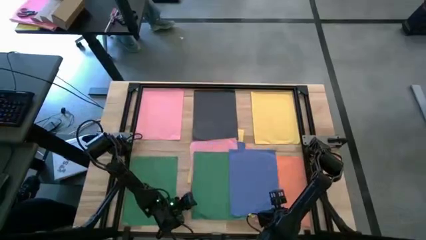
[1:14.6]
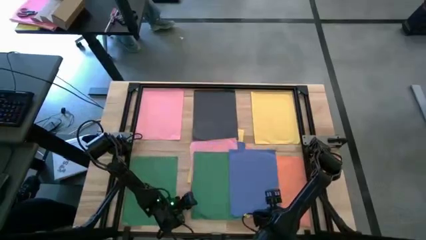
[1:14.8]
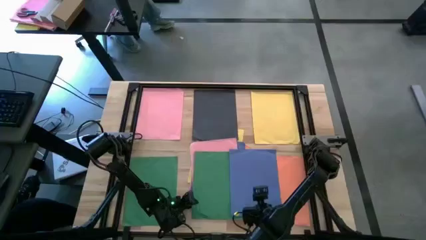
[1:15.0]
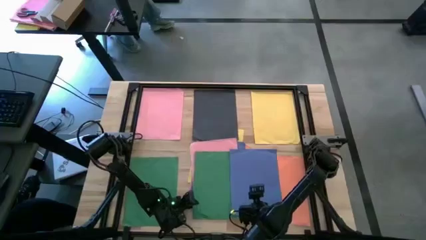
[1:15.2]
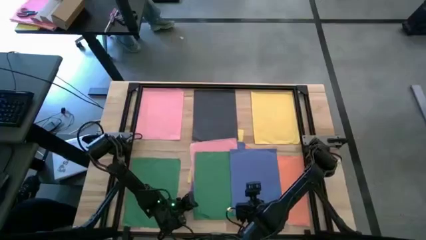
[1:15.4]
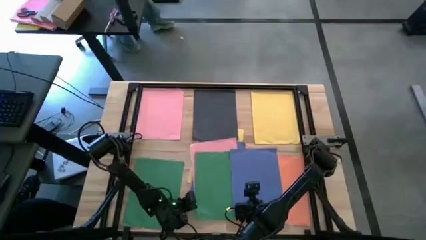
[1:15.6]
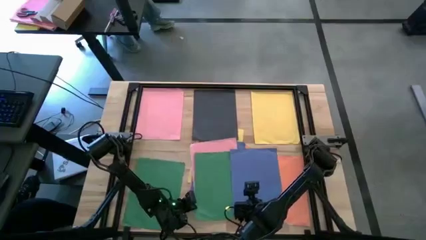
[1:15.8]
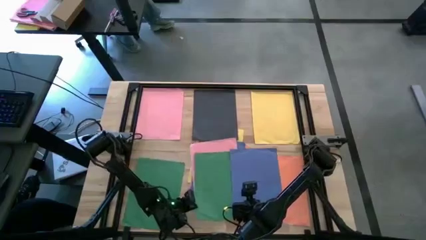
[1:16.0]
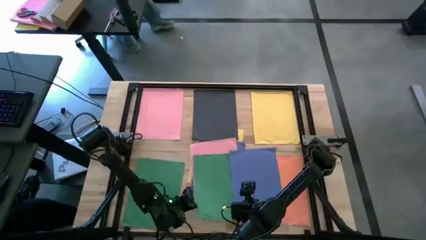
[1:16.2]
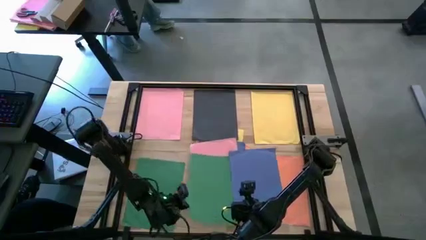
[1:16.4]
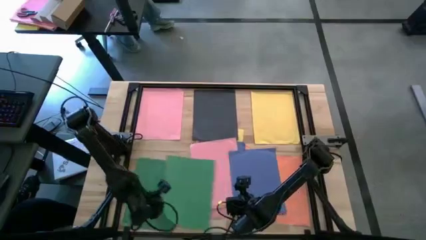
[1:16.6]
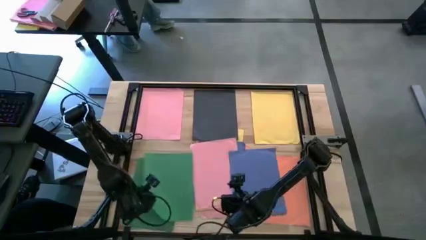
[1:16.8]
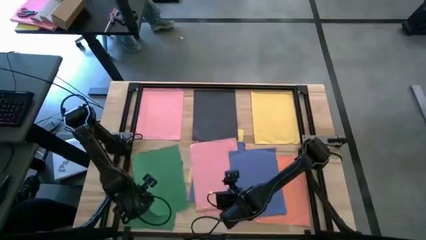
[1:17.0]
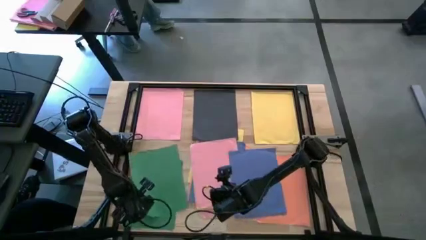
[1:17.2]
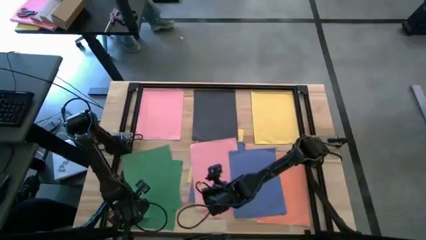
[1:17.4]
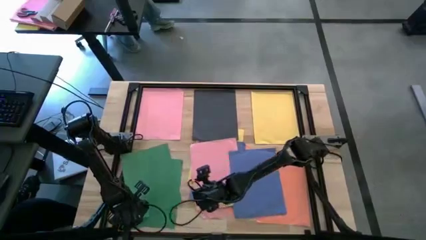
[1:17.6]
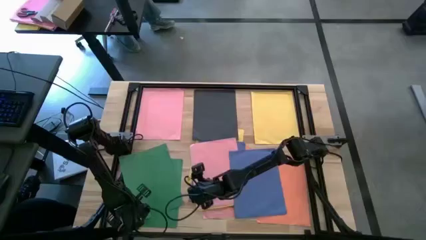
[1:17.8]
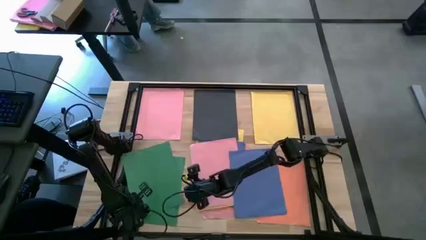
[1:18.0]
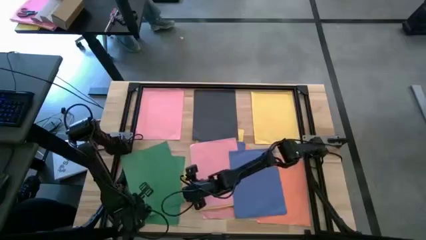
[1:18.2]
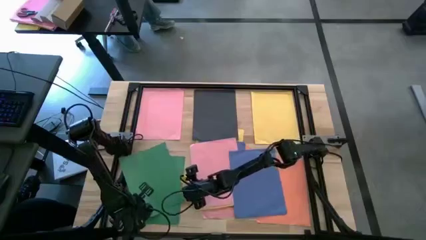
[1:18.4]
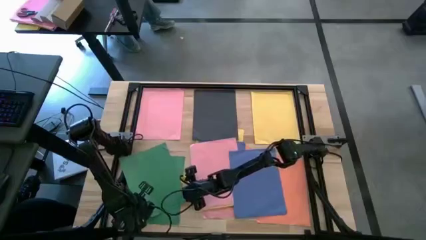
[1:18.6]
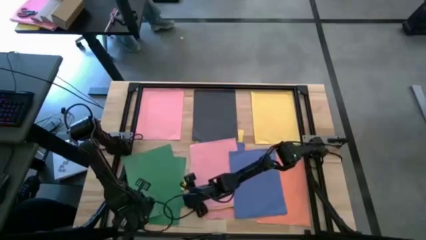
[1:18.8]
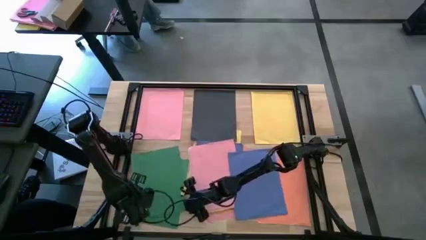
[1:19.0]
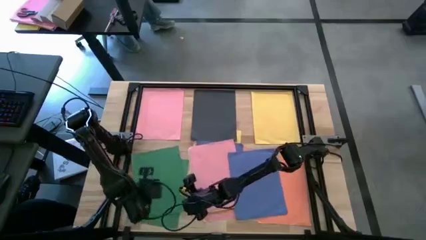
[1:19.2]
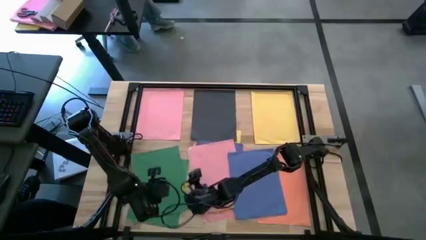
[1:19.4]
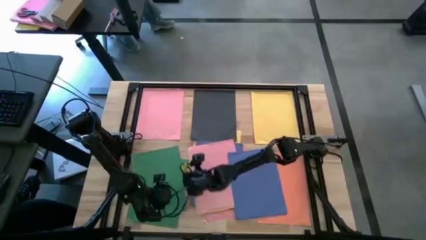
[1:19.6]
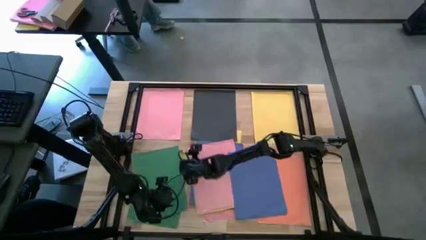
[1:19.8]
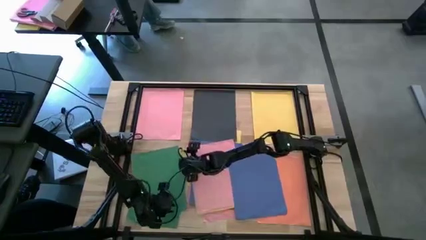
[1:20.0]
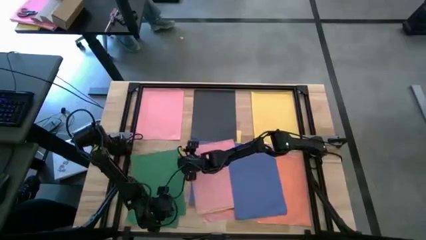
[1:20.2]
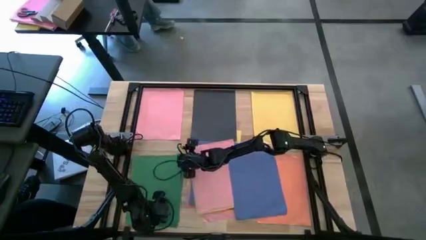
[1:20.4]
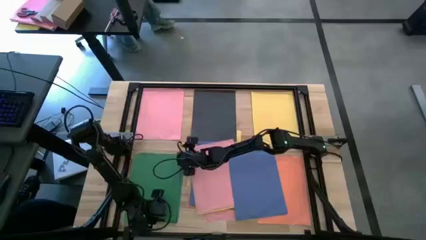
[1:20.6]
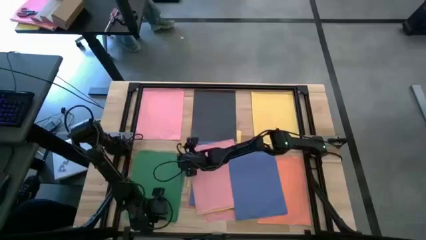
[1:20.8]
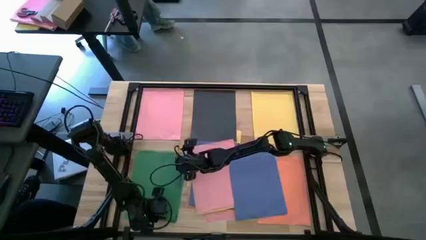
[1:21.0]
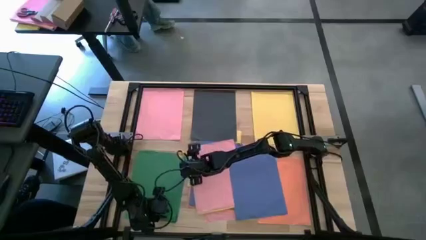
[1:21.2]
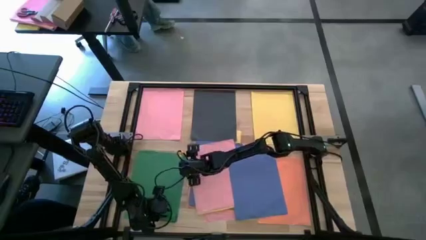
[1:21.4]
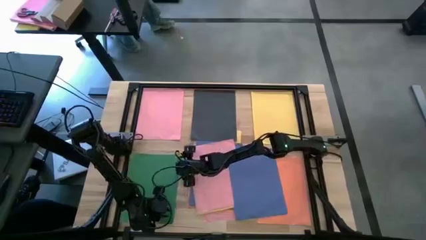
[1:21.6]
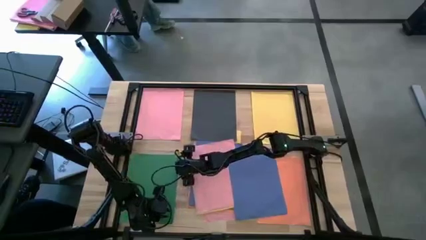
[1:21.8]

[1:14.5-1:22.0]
Task: Organize paper
Stack the green color paper on top of the other green color paper

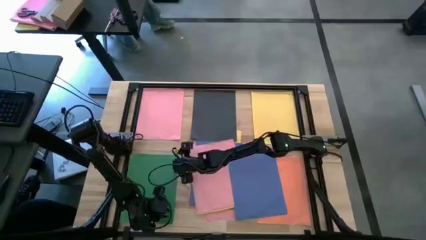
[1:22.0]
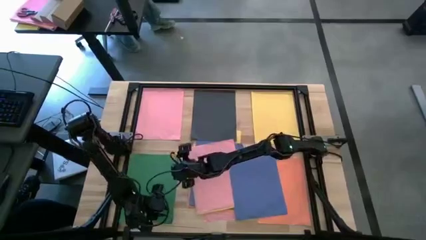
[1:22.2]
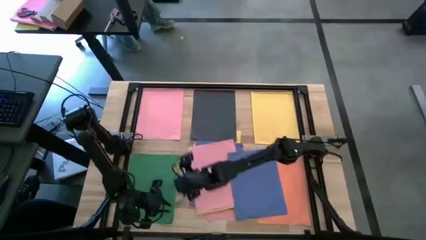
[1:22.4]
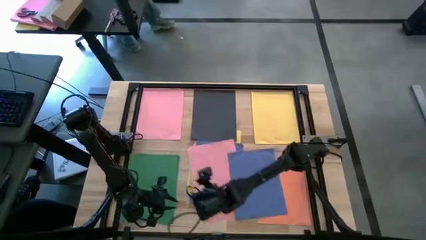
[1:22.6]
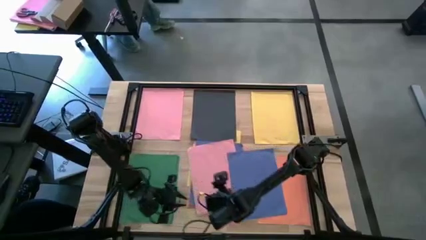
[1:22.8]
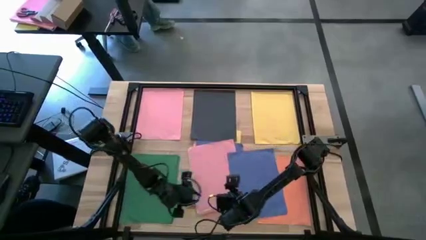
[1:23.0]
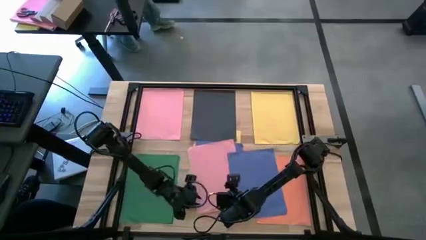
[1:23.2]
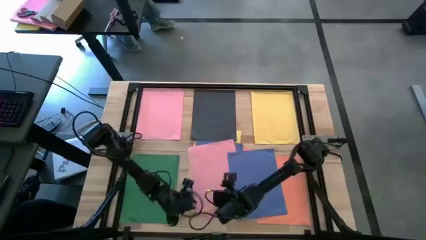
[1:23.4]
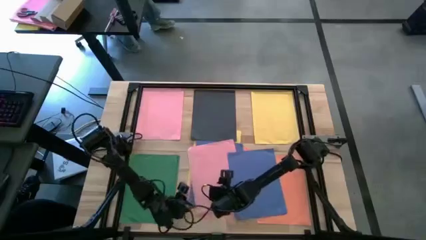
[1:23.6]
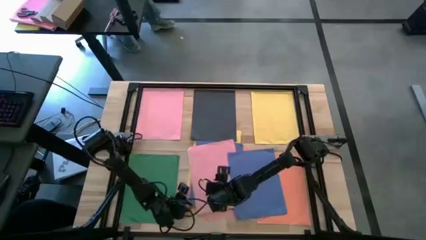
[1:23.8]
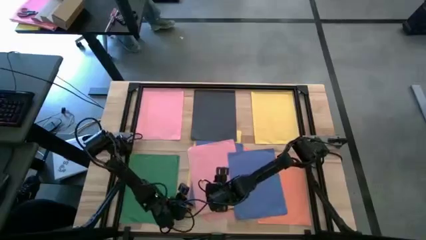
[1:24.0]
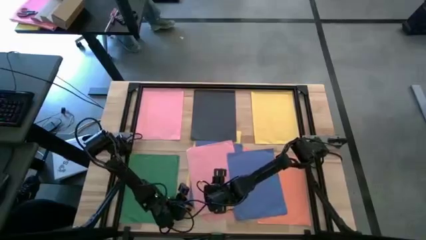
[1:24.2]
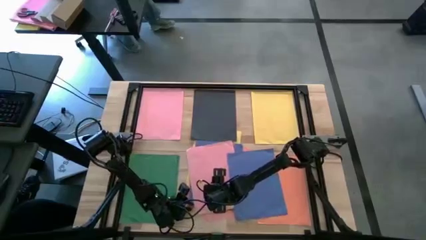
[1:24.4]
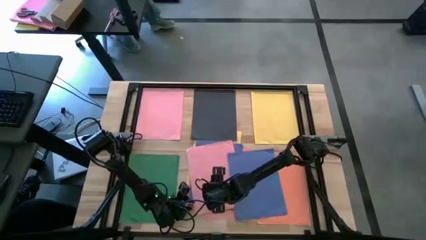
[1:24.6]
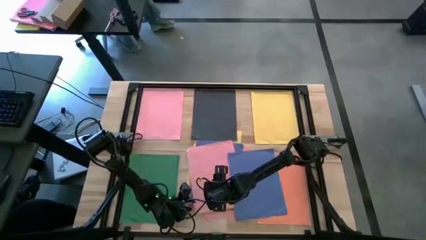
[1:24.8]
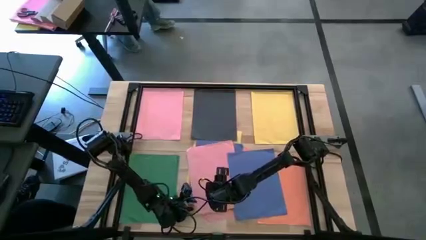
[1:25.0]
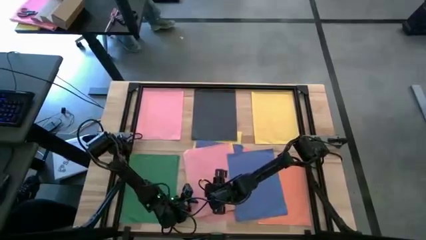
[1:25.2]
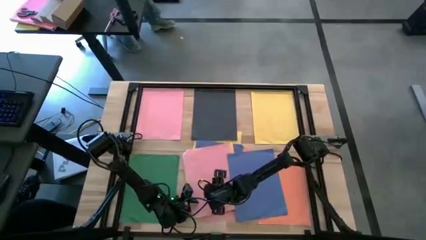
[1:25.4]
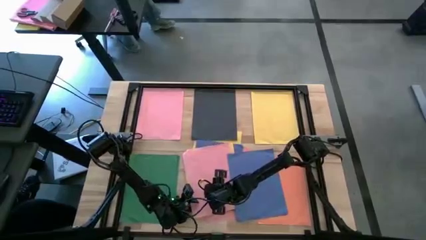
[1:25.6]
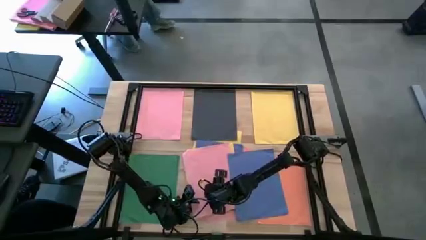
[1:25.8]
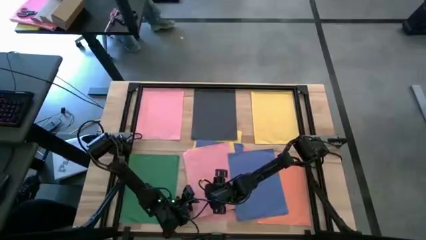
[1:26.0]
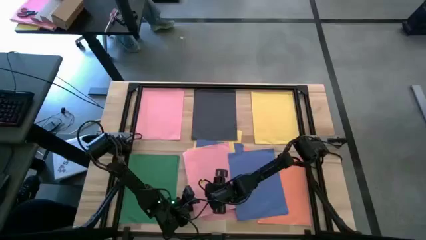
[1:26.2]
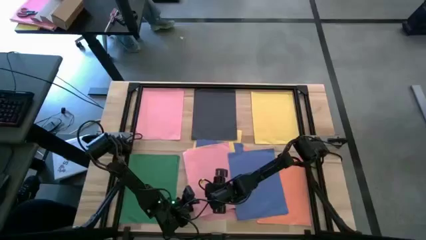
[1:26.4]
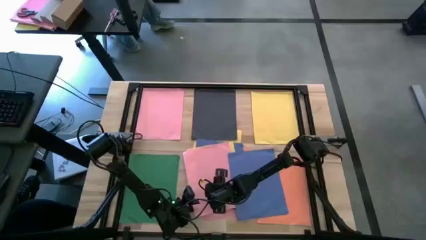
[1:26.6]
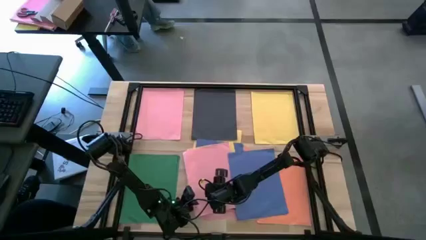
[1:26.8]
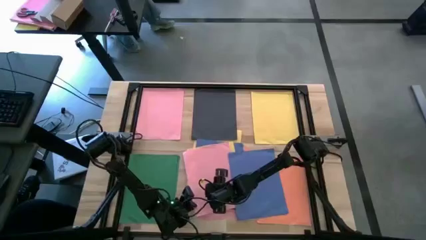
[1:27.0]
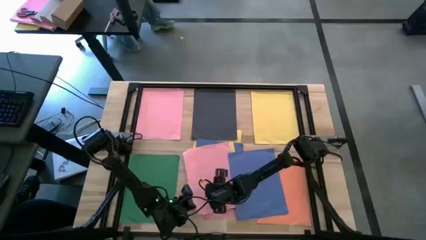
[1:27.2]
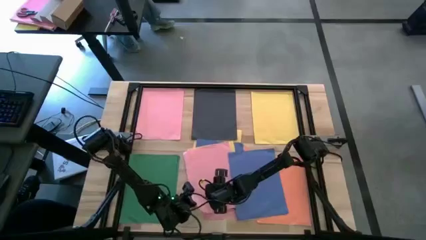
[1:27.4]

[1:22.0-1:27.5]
Stack the pink color paper on top of the other pink color paper
